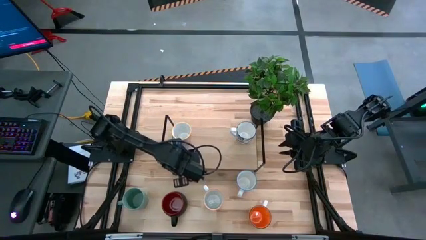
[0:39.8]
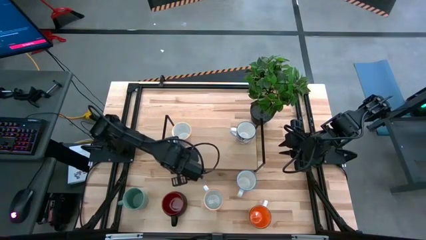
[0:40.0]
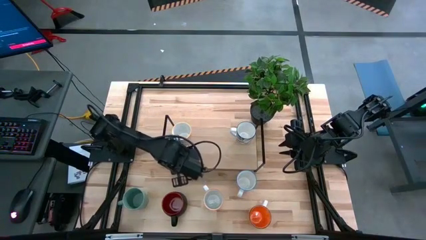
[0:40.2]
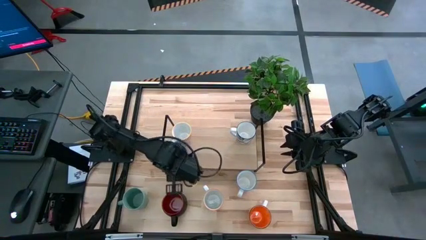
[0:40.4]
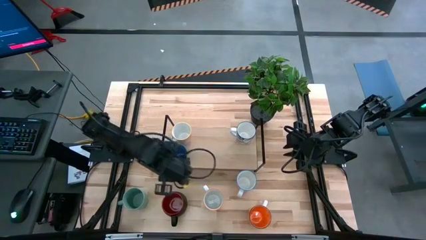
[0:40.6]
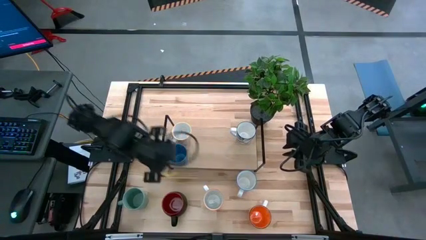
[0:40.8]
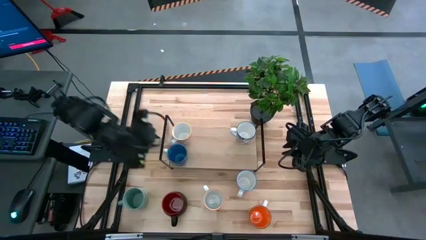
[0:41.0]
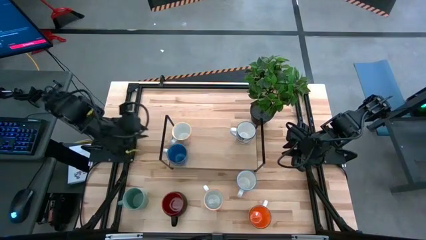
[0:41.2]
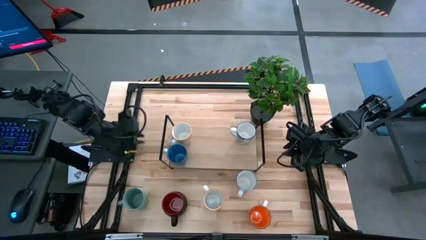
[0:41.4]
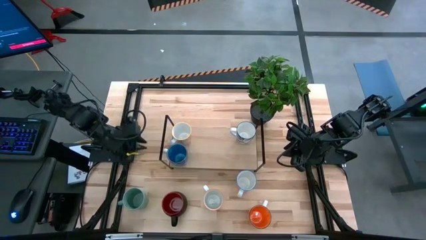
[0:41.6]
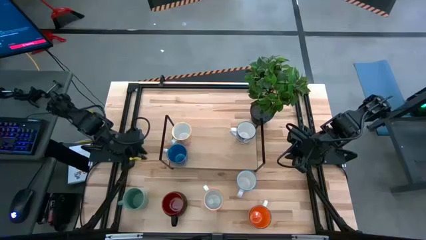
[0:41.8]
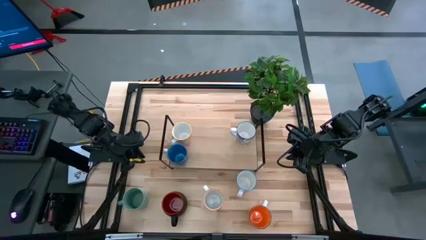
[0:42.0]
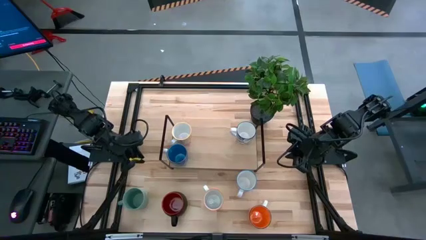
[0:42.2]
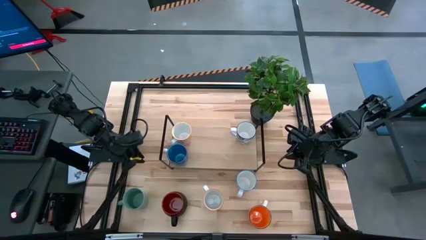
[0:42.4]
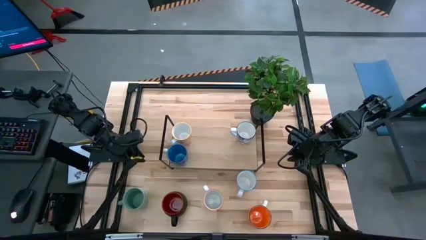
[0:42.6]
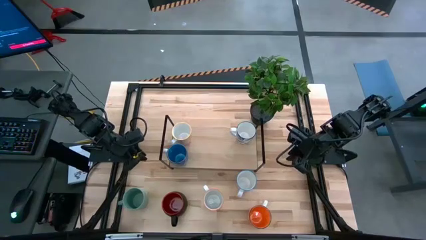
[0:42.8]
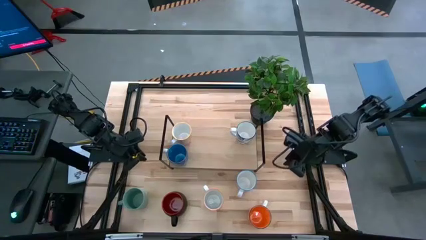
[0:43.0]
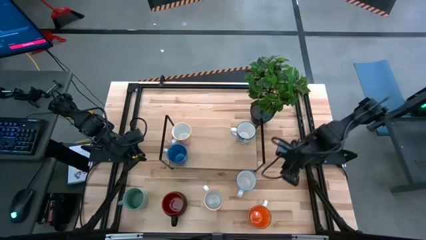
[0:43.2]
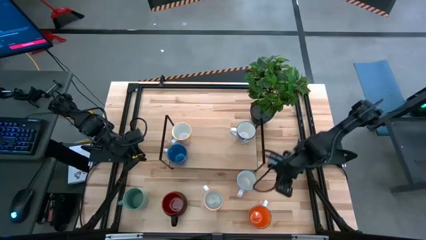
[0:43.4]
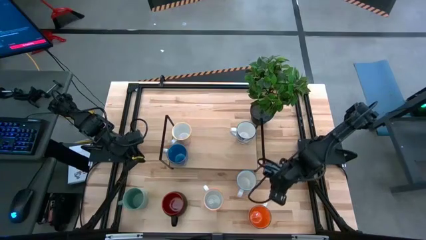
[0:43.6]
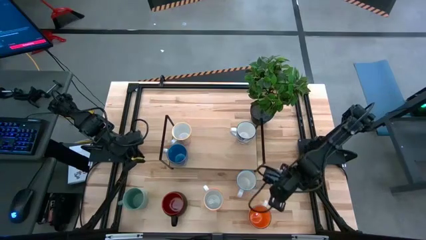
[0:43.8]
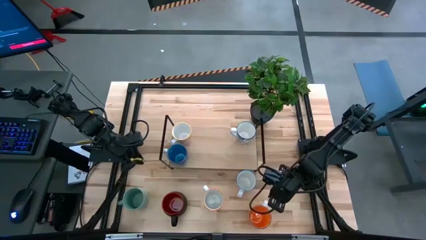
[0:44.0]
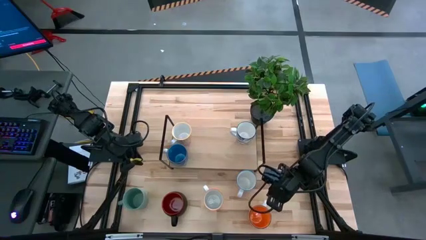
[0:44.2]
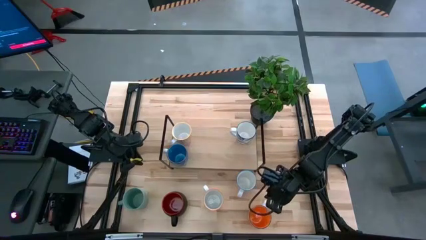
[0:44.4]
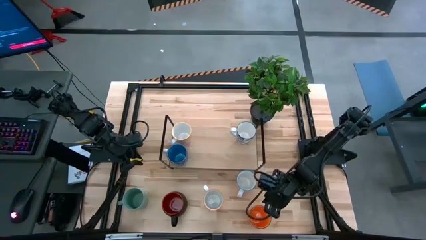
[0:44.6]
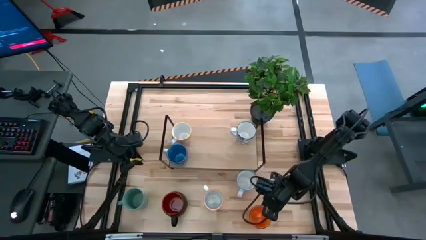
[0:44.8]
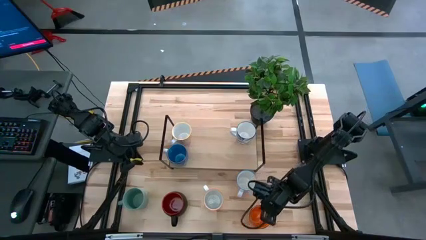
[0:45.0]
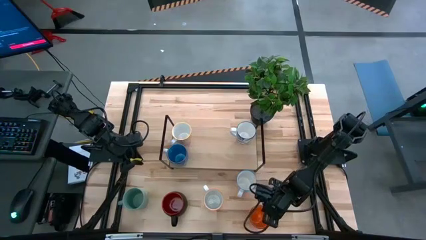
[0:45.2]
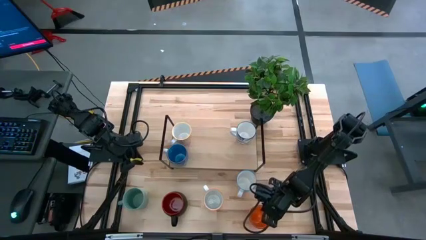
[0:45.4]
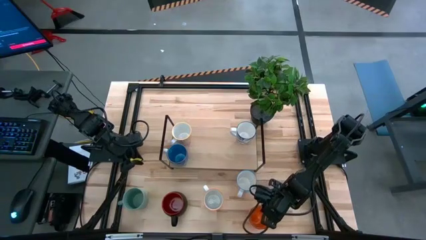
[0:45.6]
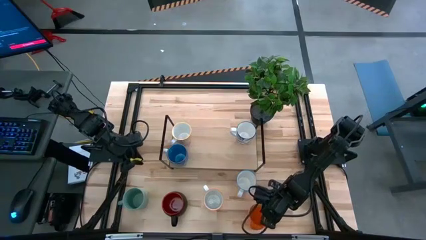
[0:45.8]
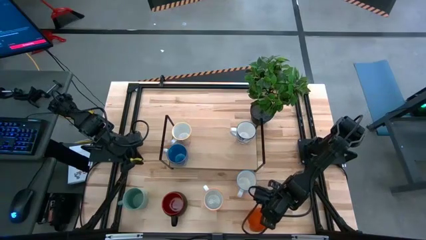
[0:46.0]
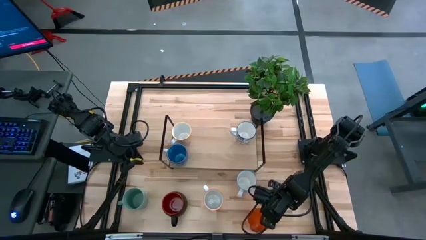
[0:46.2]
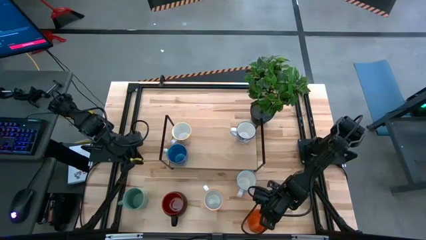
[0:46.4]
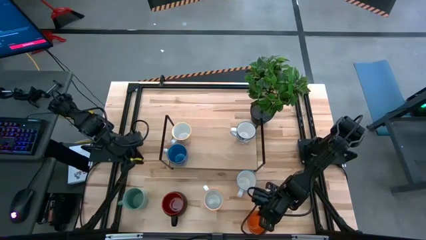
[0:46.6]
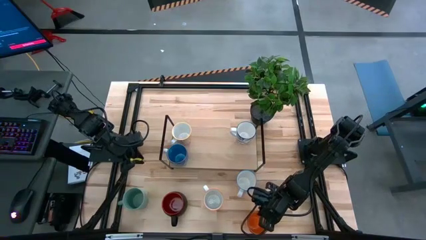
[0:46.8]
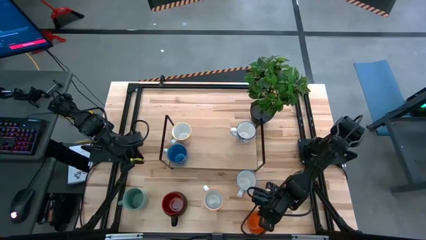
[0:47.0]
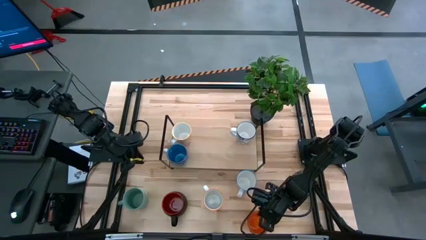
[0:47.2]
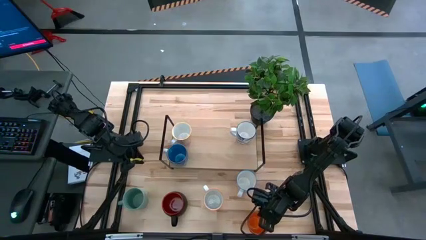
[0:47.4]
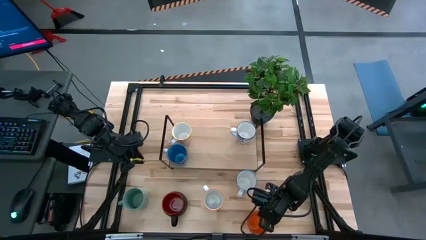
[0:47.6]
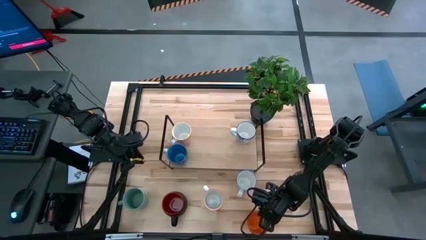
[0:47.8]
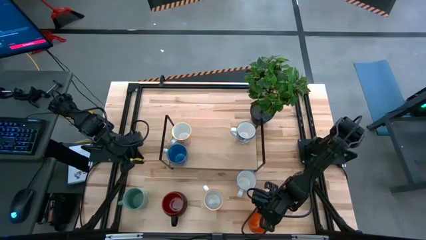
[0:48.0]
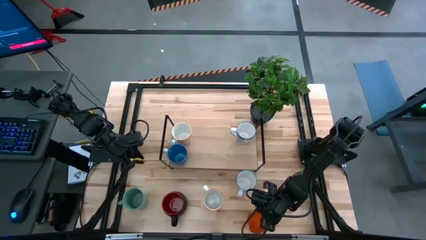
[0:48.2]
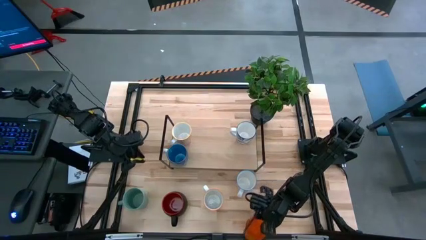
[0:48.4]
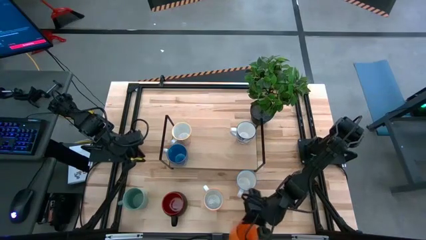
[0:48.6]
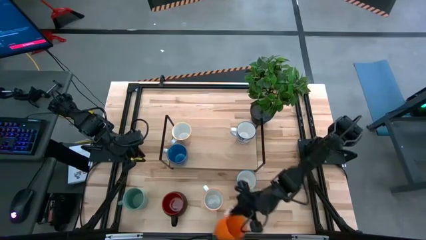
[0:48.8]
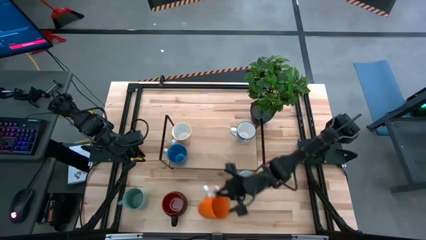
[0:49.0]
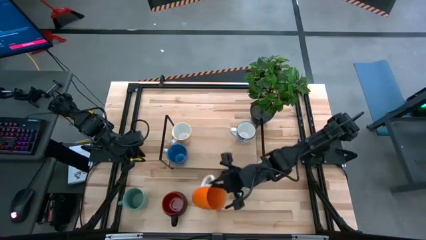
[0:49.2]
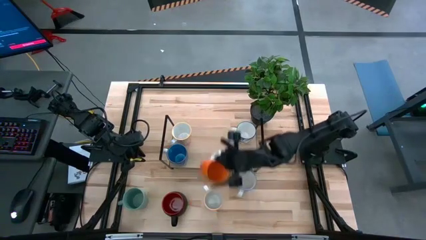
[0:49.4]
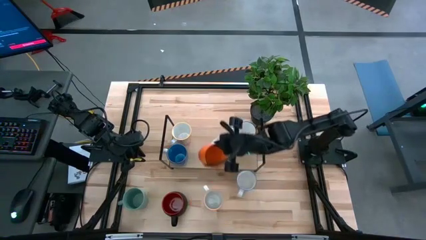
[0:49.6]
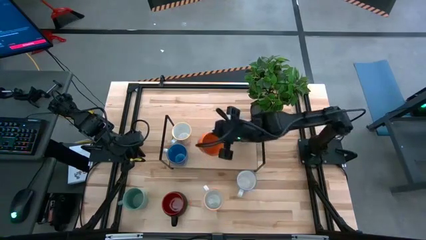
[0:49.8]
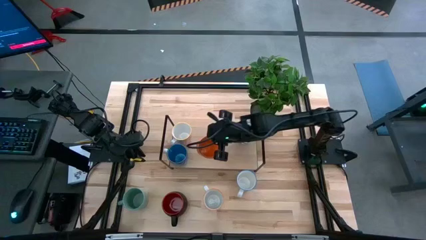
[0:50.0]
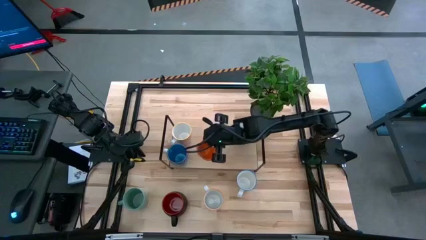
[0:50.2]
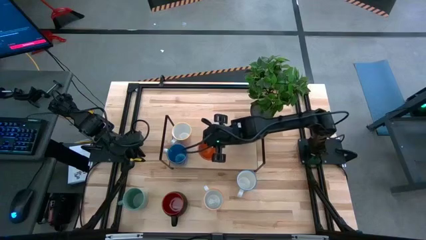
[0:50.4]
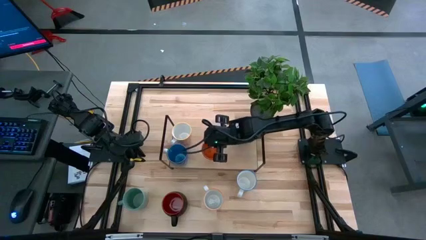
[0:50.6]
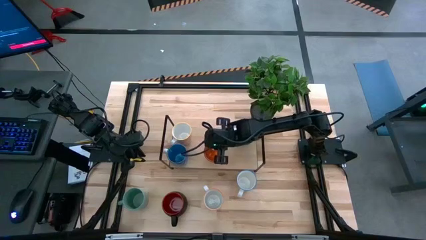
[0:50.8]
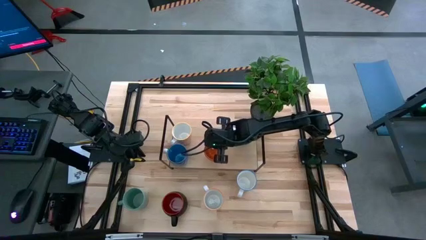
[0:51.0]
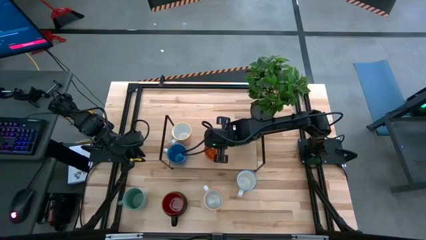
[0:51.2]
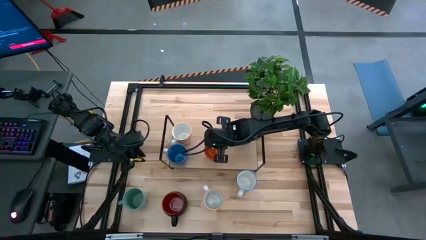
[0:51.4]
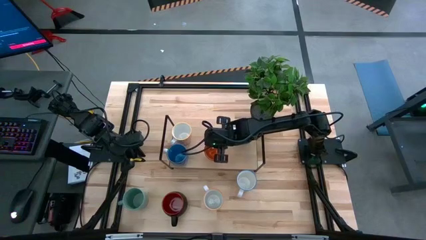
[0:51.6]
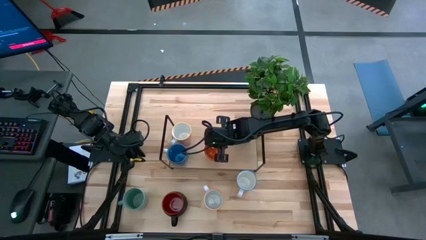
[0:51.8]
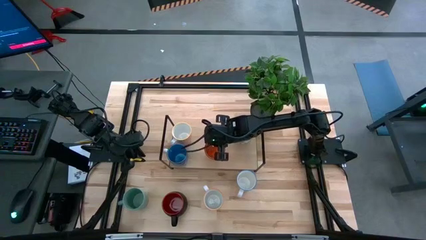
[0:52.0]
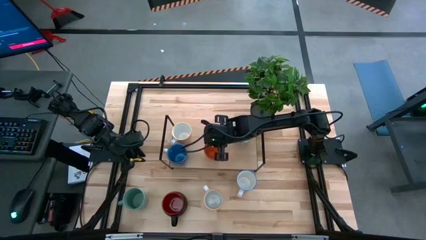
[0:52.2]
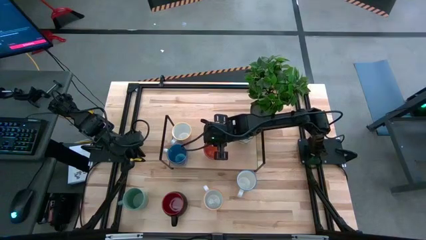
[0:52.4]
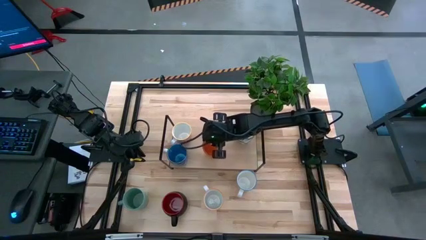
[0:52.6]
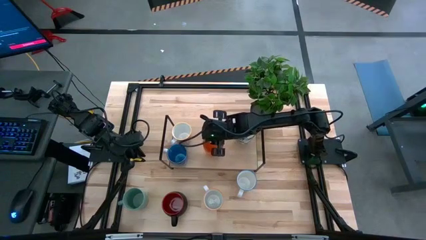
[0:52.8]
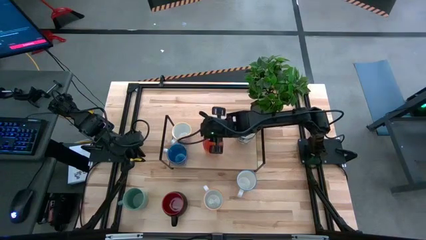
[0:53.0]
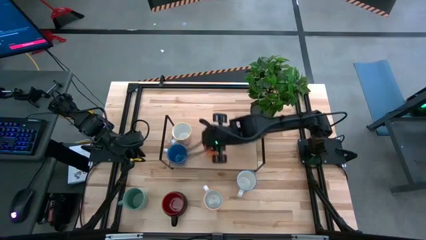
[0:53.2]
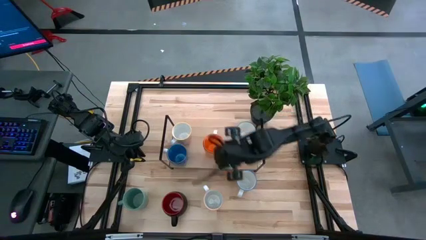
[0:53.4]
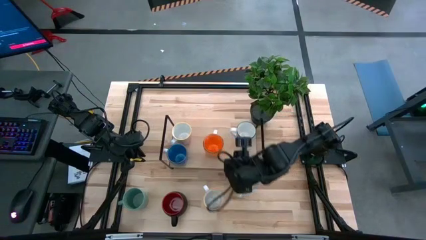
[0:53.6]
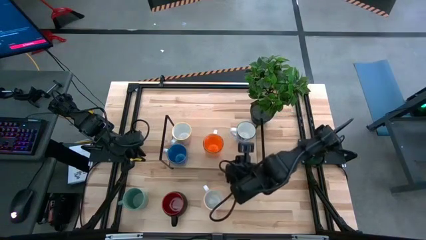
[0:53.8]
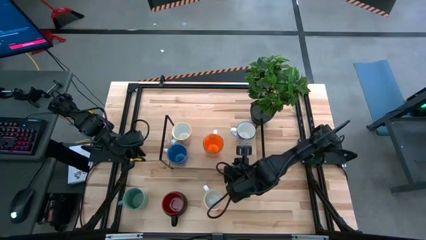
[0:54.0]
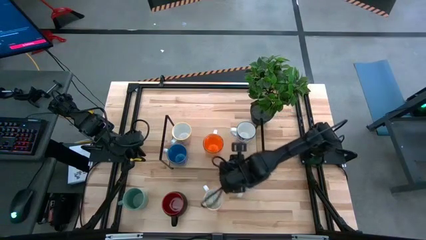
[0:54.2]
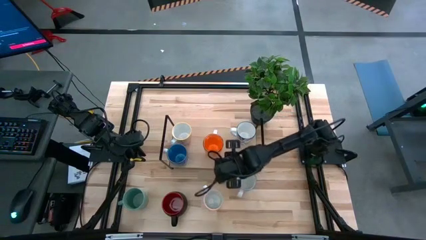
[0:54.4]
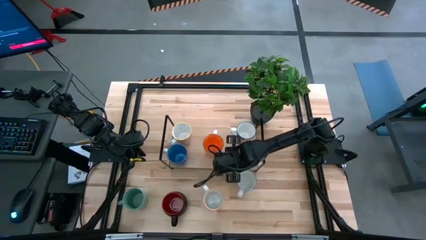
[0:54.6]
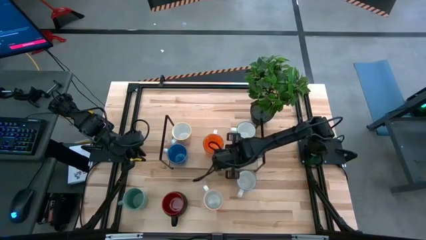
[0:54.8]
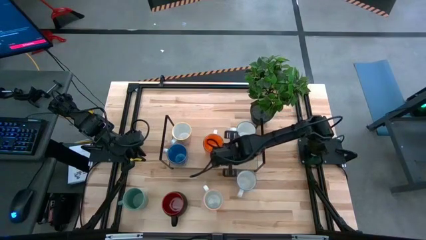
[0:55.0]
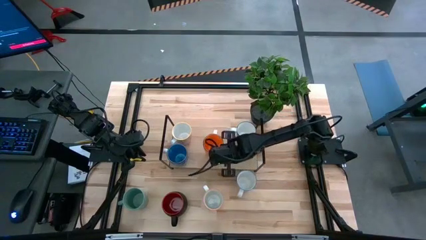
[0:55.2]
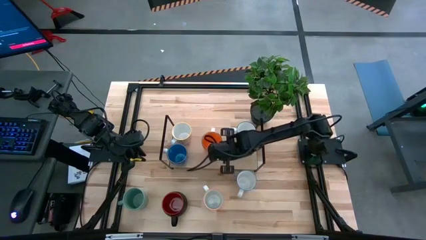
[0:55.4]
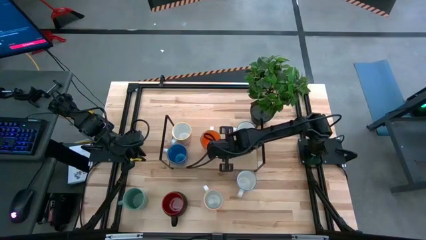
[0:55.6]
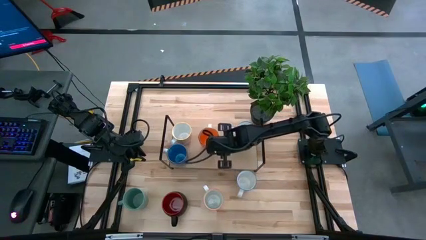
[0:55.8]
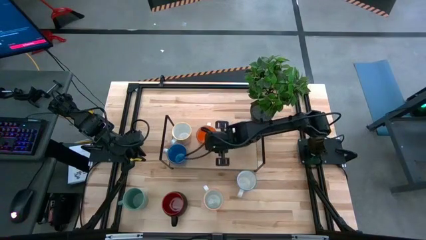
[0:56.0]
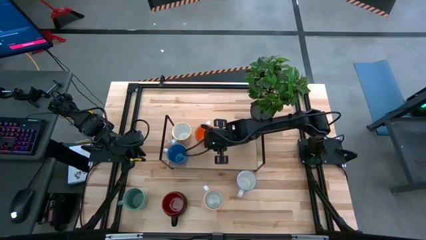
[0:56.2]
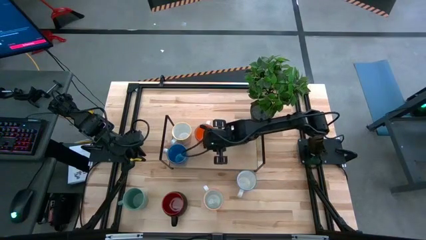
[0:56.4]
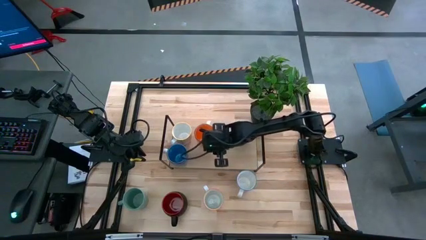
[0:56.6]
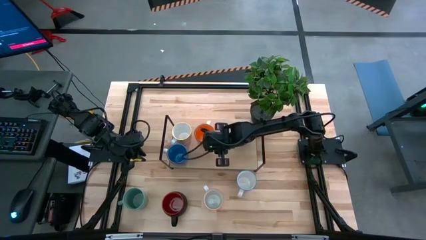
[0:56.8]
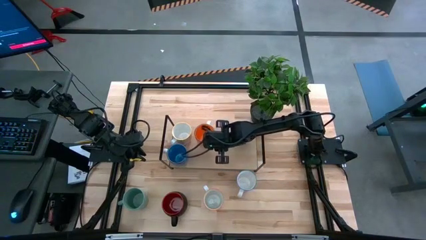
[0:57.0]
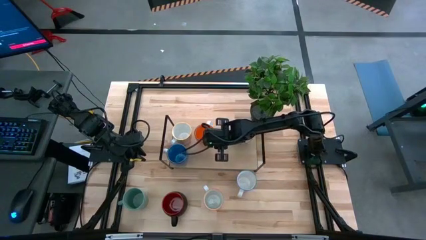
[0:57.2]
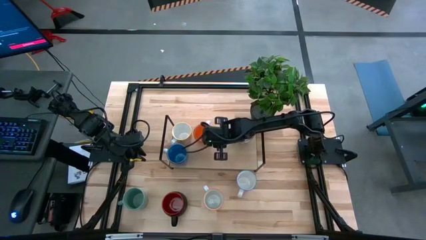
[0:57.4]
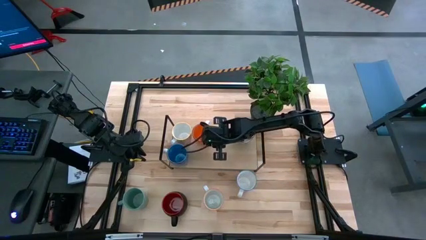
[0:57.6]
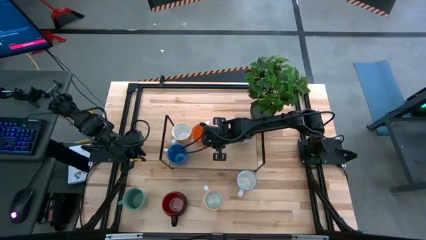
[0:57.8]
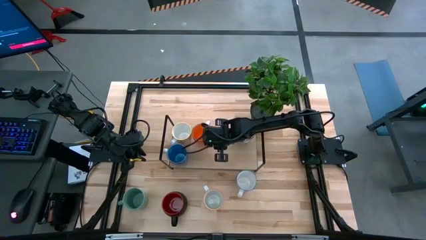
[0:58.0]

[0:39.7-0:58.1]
Task: Place coffee mugs
Put the orange mug on the shelf
